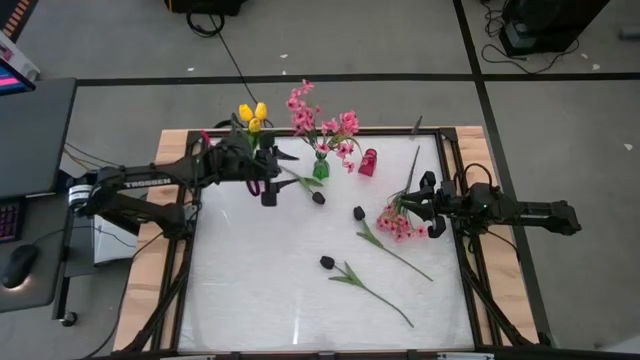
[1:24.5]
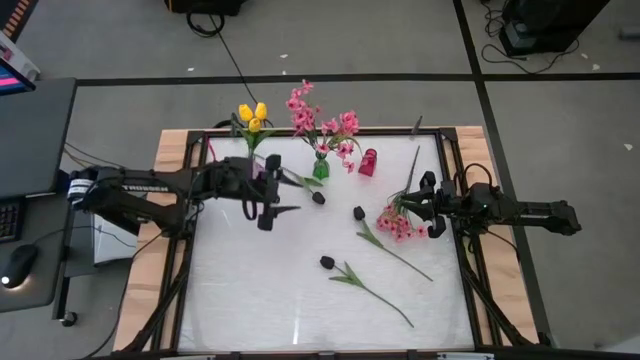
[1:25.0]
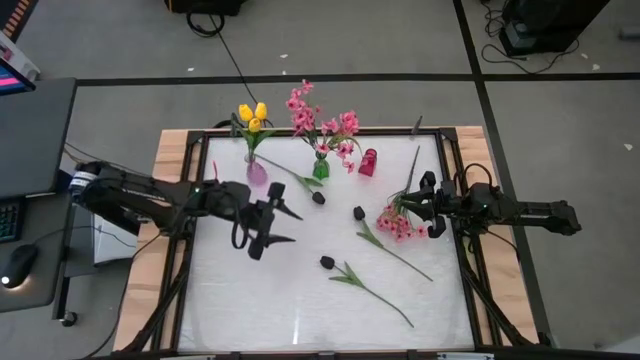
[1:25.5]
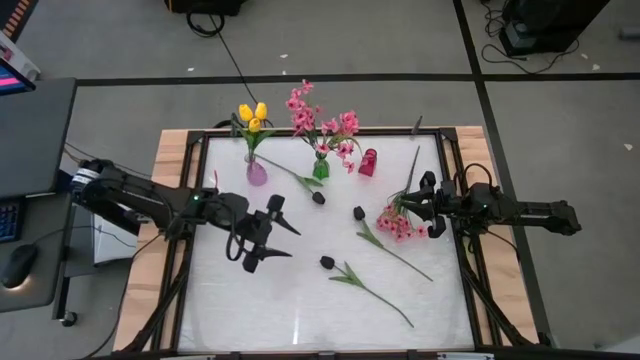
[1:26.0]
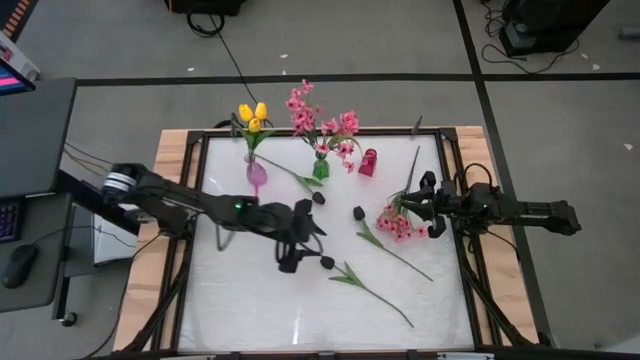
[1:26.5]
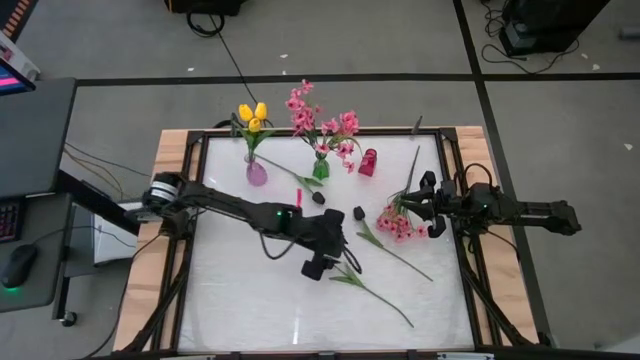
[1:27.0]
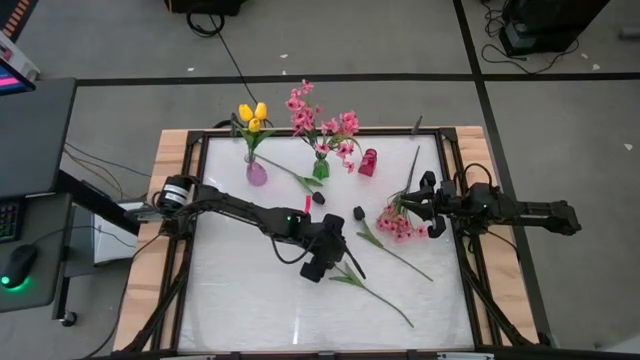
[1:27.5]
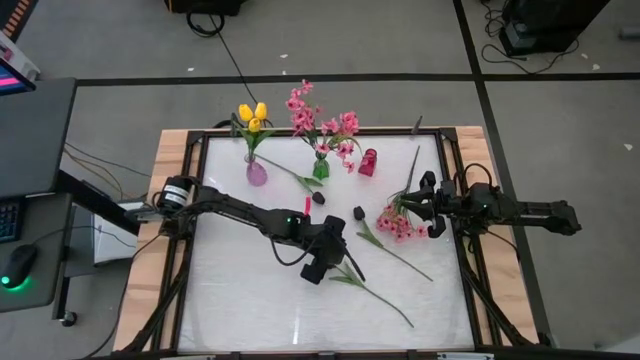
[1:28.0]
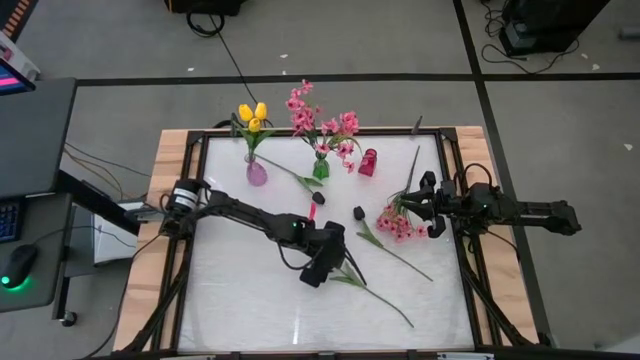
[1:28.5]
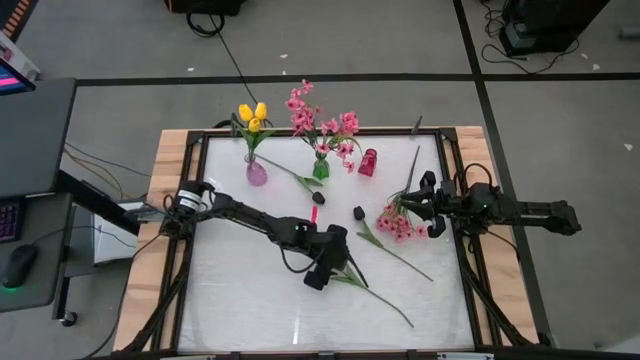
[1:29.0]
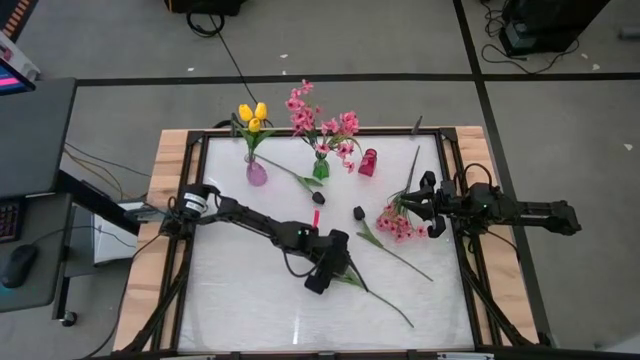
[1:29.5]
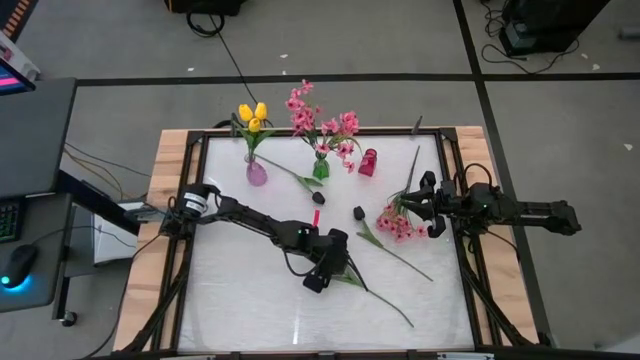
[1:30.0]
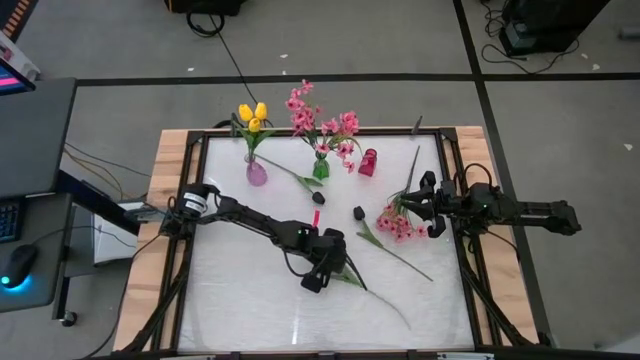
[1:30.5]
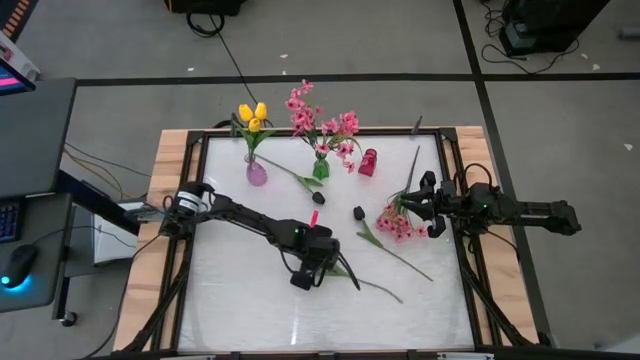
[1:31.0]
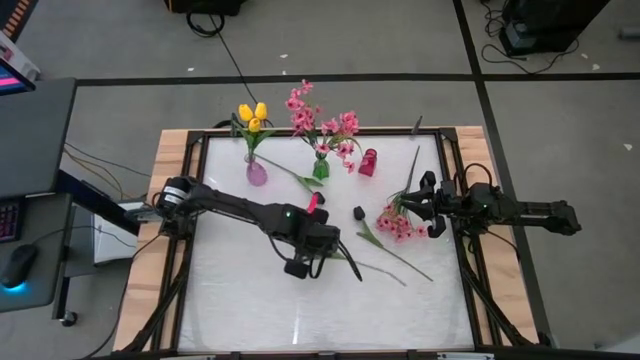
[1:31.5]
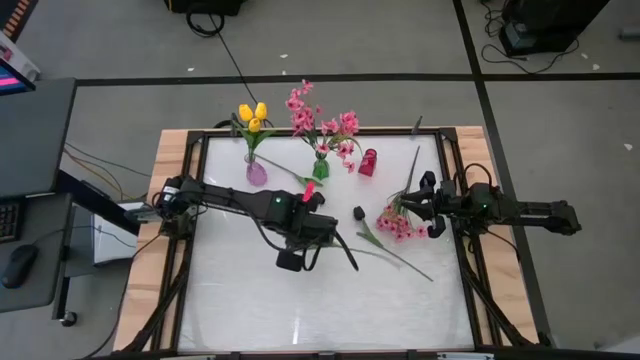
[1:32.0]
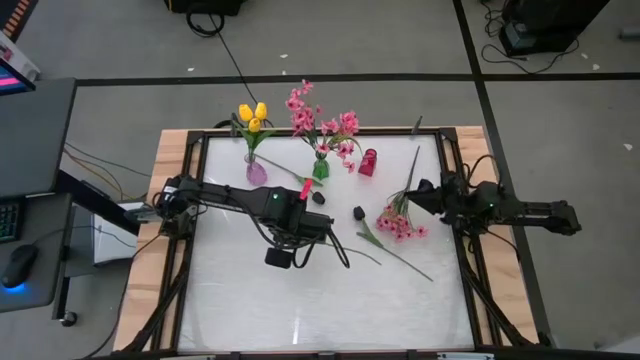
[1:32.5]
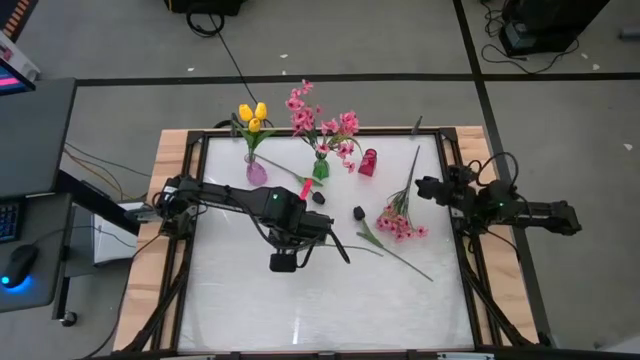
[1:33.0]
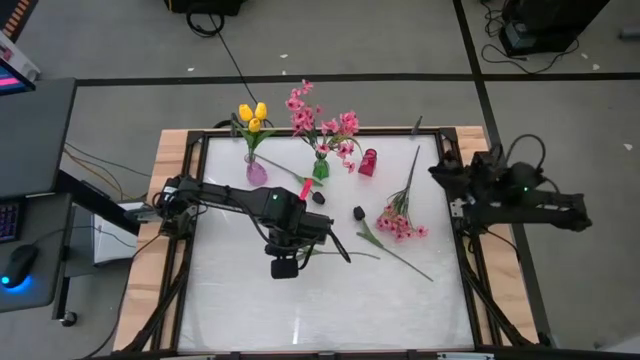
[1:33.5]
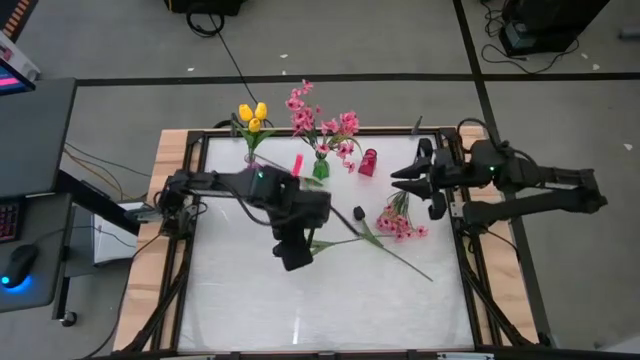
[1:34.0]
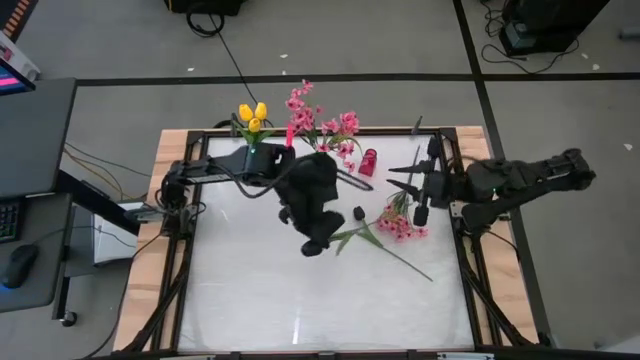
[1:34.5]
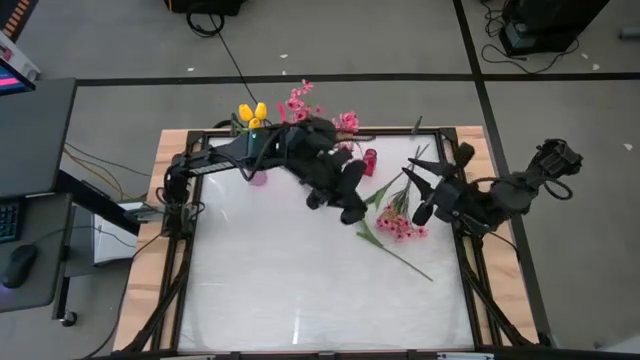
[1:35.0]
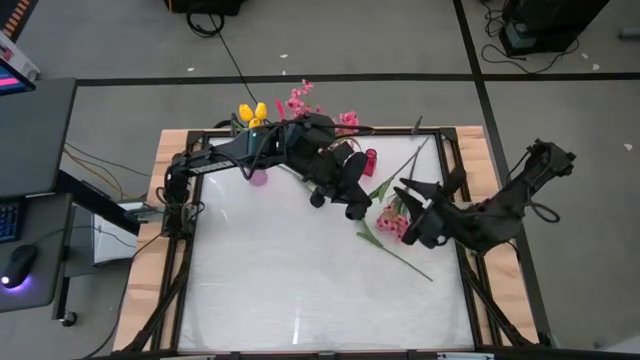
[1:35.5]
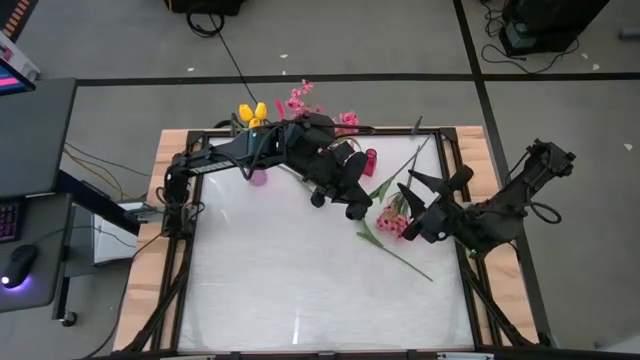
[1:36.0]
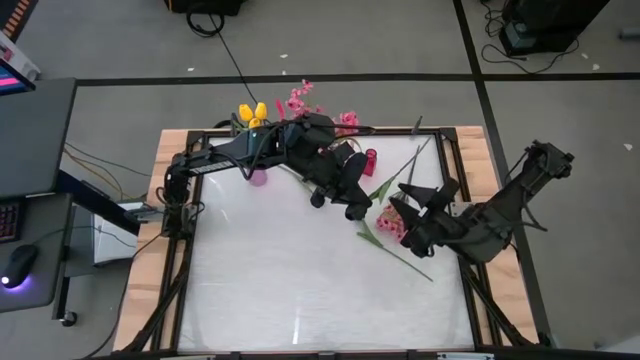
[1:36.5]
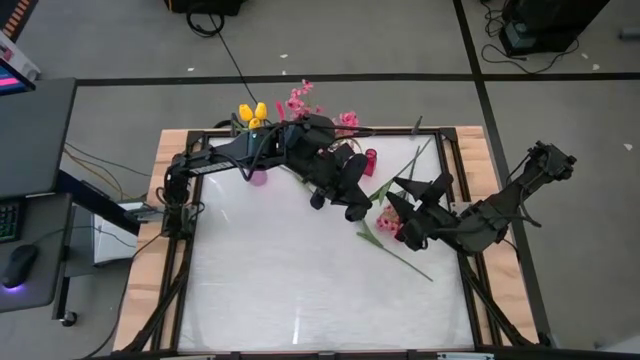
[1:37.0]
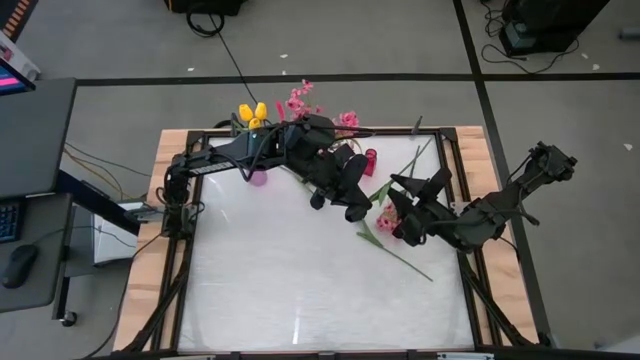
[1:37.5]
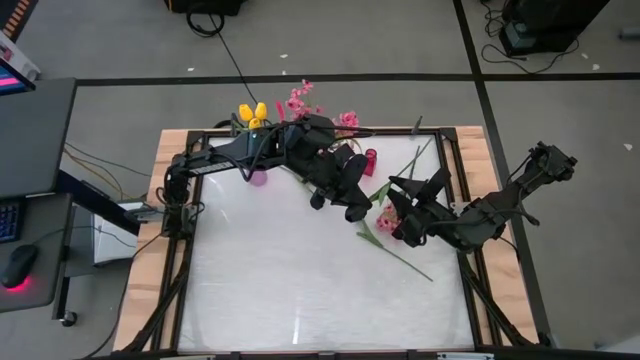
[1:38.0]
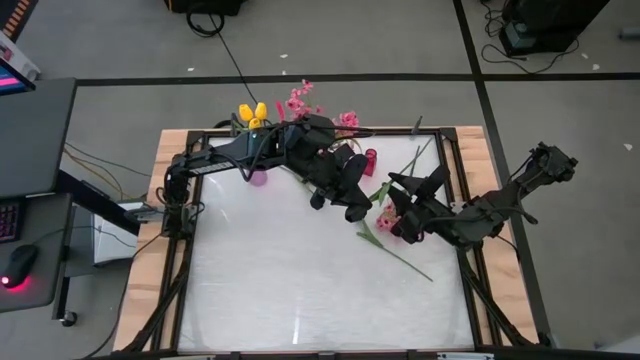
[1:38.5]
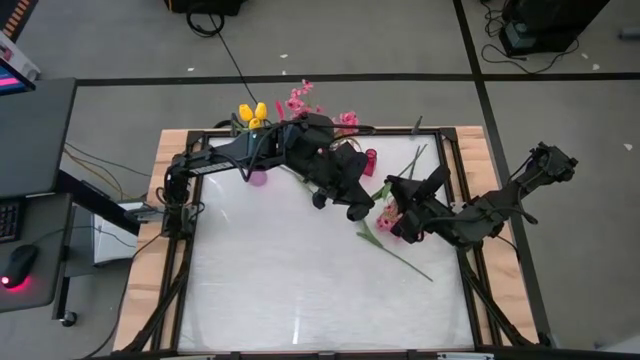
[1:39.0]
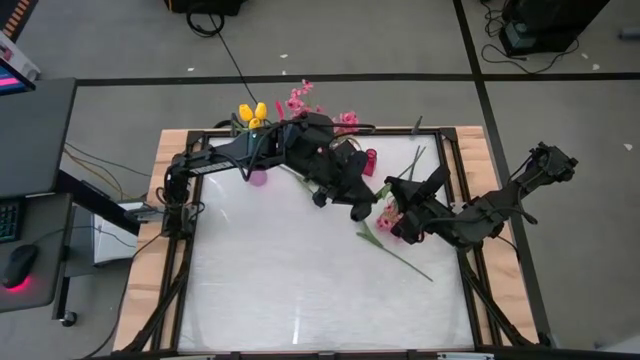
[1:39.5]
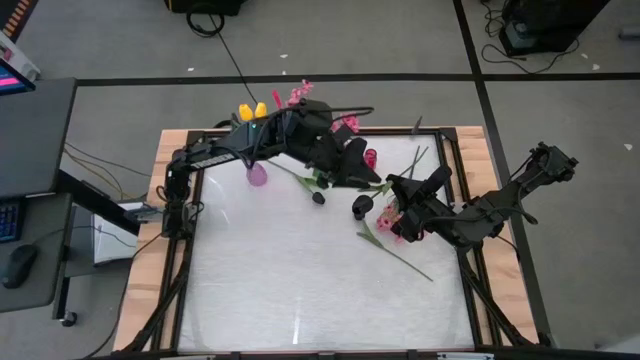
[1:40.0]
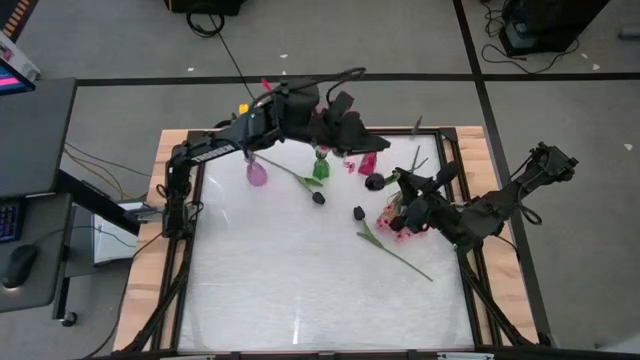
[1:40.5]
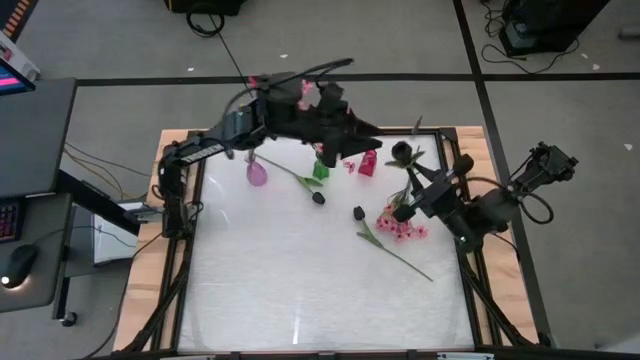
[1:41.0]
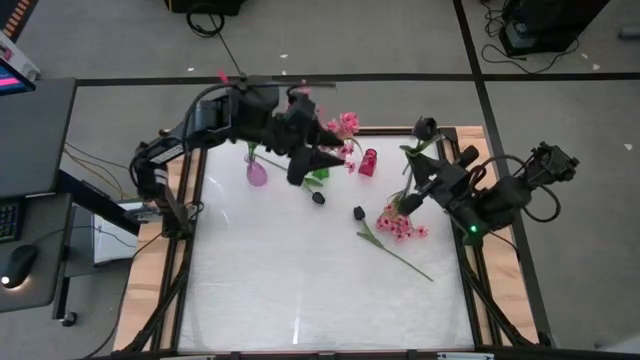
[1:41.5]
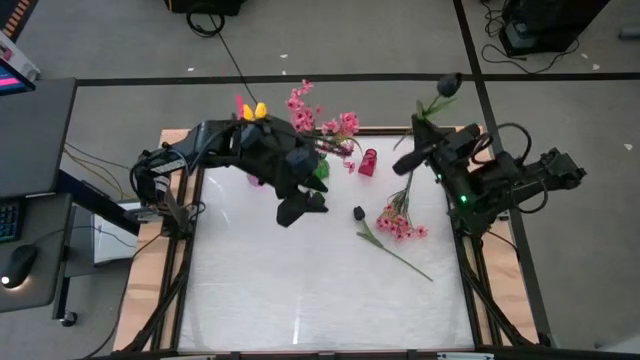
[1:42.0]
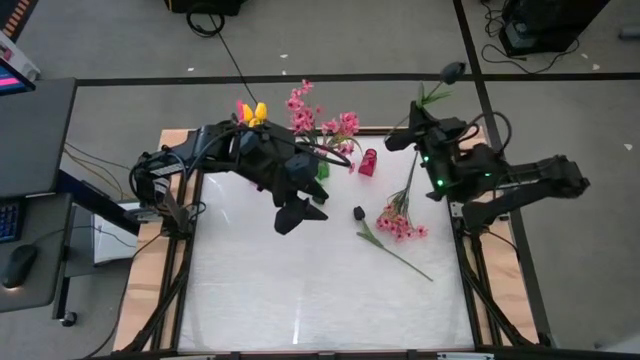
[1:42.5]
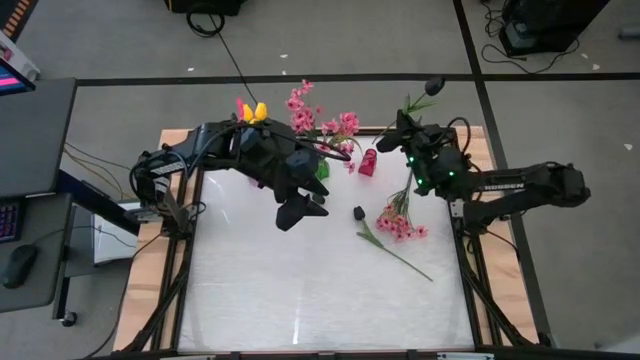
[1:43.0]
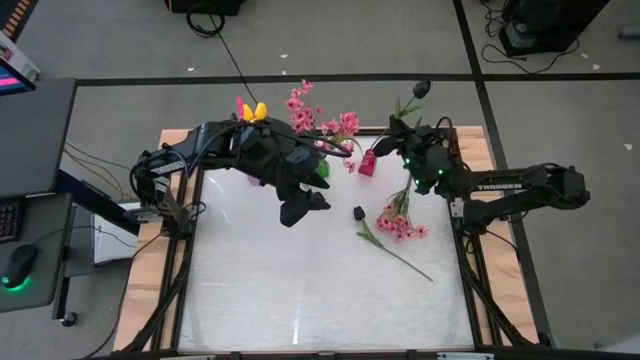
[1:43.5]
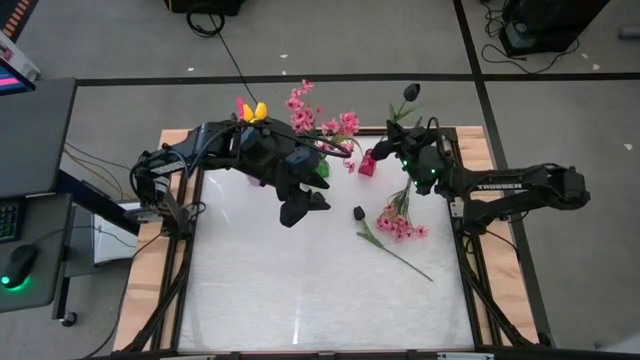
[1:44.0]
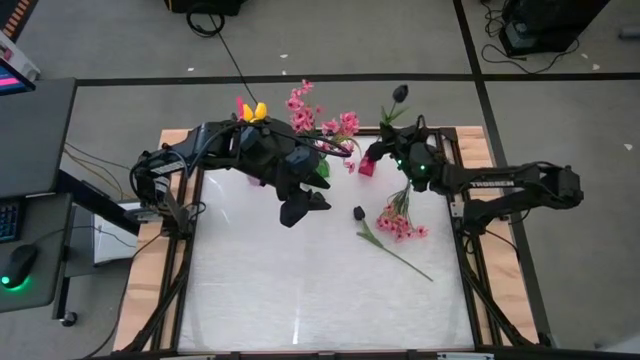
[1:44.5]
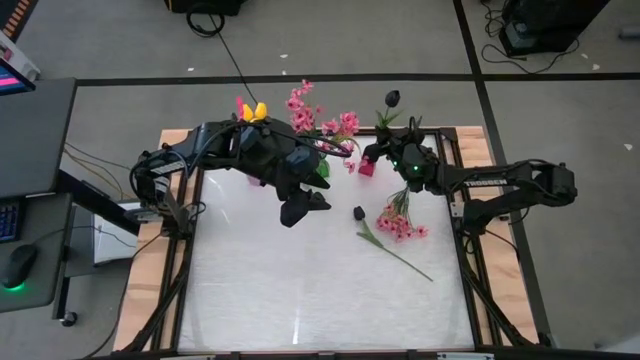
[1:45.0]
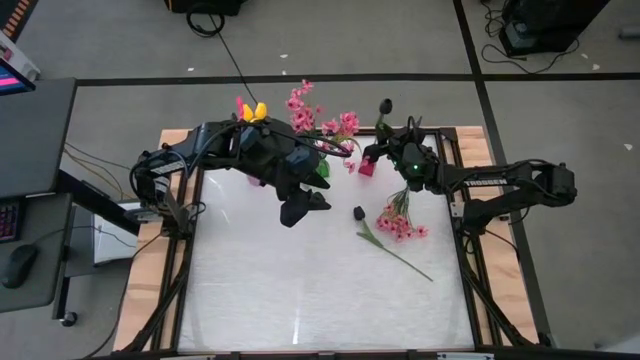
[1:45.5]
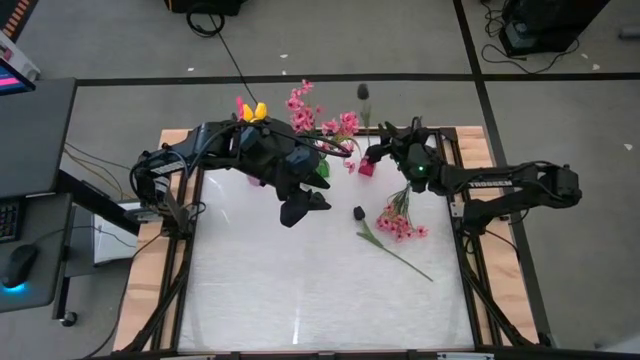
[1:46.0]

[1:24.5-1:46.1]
Task: Sort flowers into vase by color
Put the bottom black flower into the red vase
